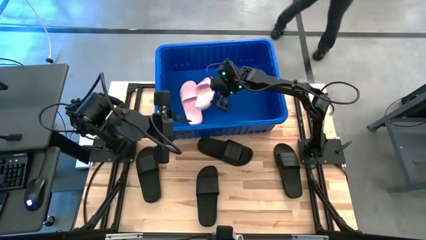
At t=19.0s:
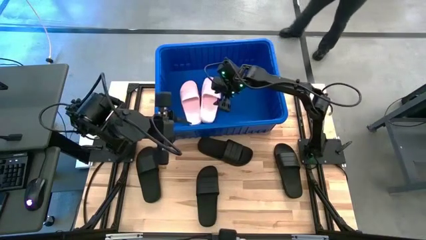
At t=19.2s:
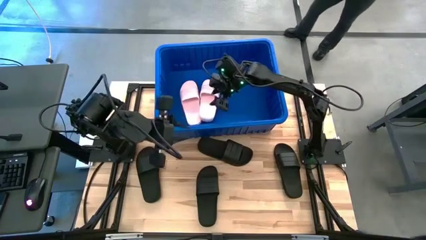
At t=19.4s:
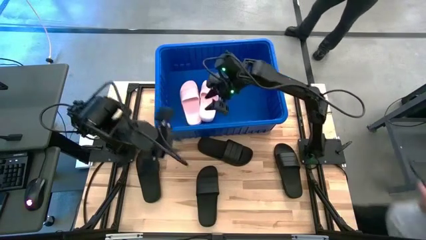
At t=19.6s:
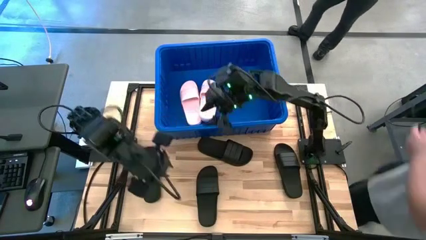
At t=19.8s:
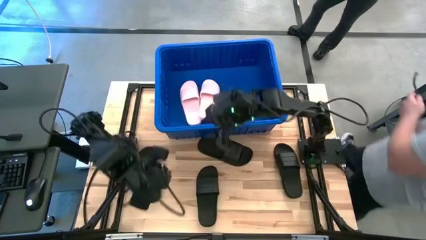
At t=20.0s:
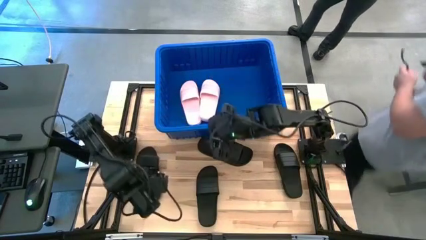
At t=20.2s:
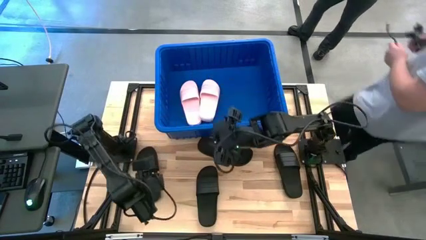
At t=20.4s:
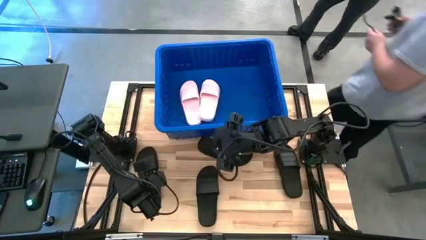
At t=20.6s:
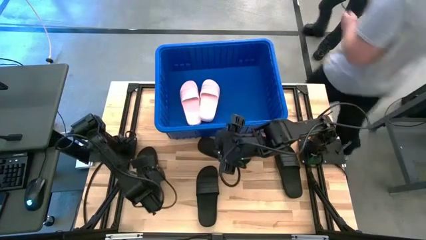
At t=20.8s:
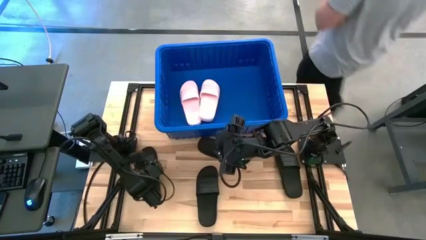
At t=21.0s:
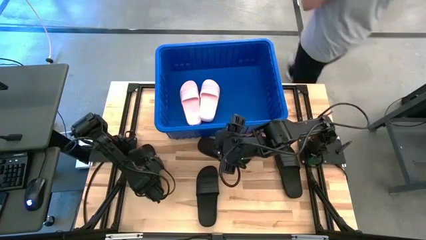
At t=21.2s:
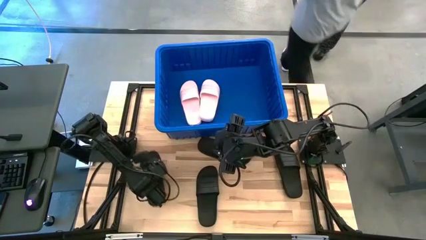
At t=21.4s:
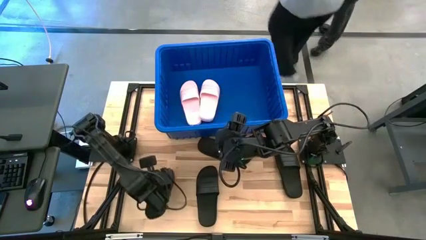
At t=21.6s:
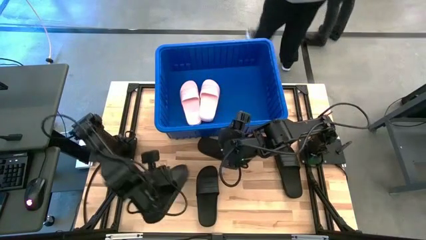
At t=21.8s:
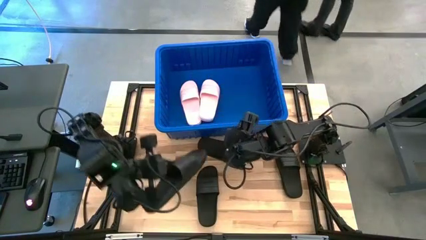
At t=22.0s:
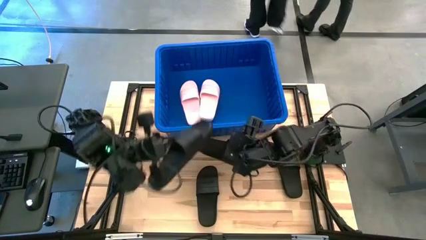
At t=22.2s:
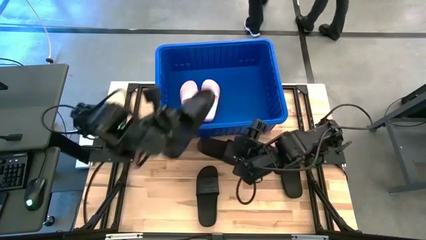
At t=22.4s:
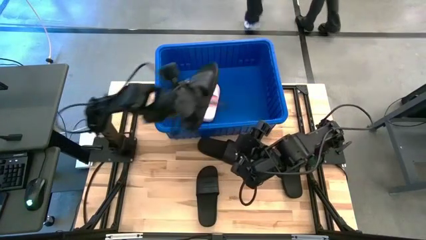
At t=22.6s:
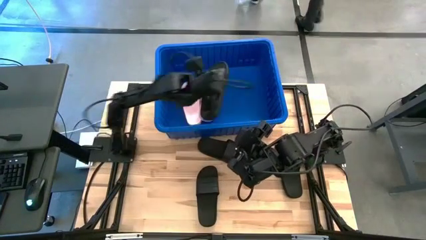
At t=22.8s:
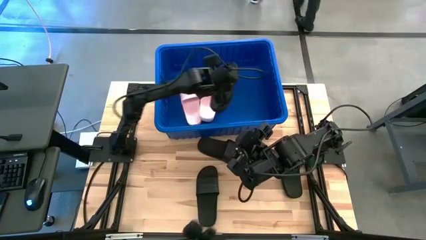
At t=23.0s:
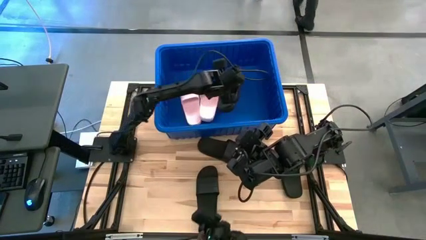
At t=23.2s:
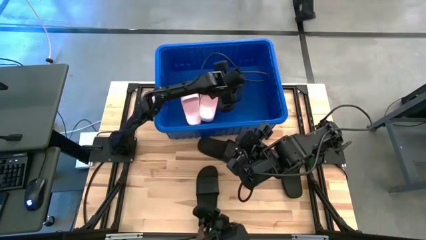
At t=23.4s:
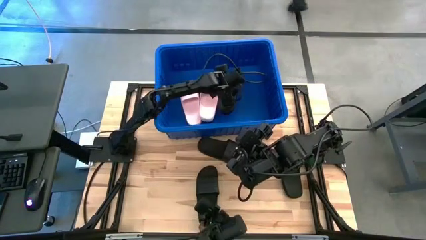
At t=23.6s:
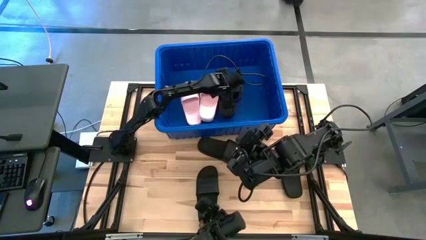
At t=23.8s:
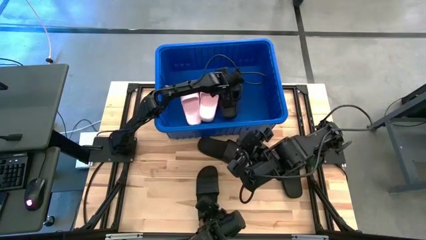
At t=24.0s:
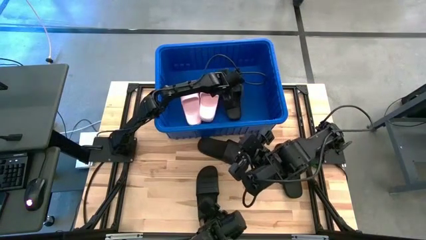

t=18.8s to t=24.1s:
Task: Pick and place slides into bin
Put the black slide into the blue container

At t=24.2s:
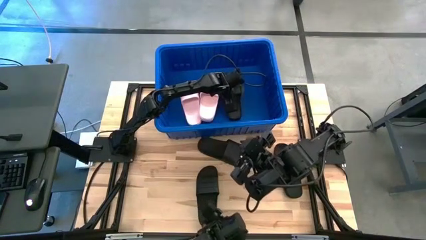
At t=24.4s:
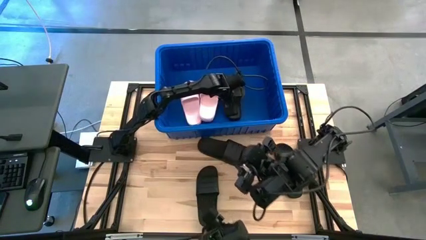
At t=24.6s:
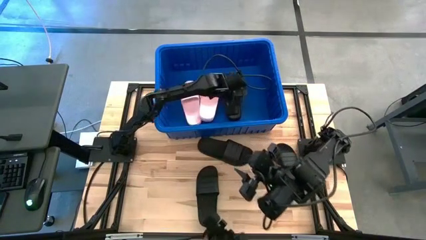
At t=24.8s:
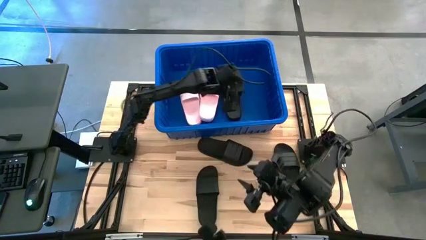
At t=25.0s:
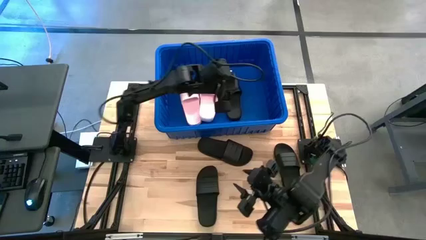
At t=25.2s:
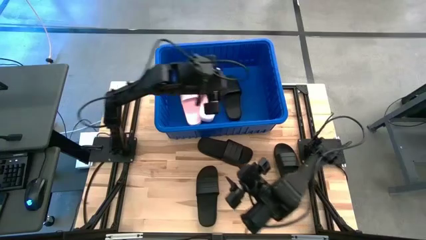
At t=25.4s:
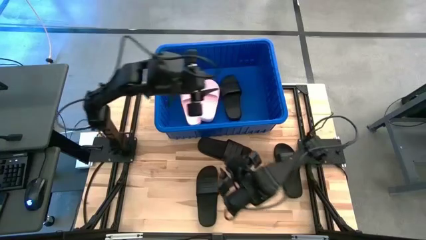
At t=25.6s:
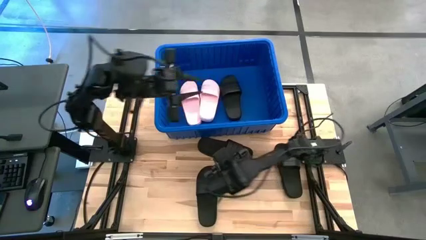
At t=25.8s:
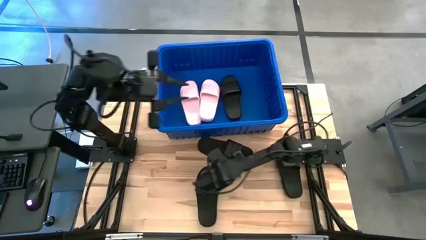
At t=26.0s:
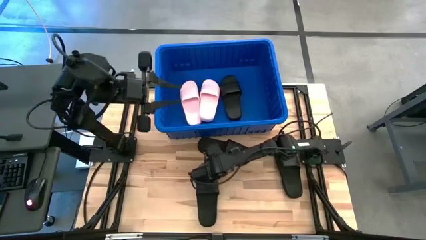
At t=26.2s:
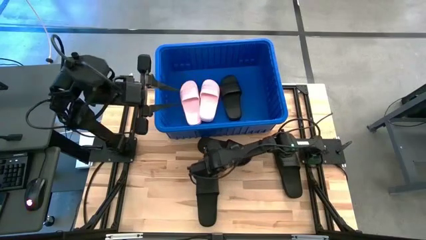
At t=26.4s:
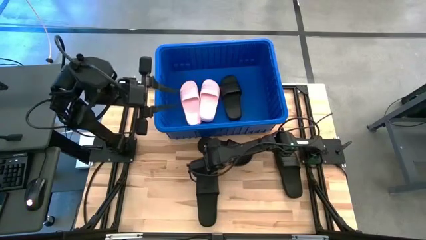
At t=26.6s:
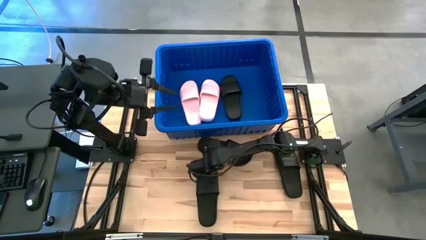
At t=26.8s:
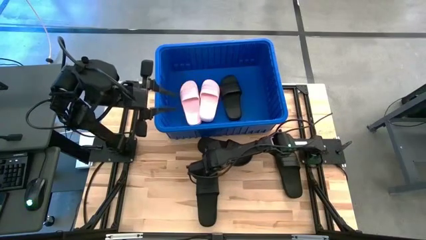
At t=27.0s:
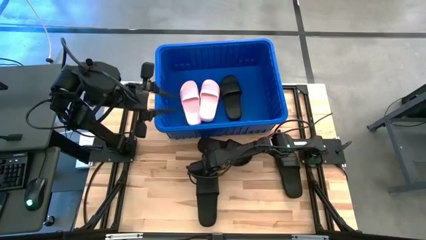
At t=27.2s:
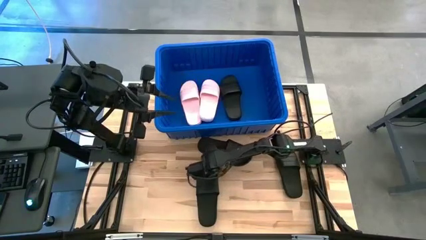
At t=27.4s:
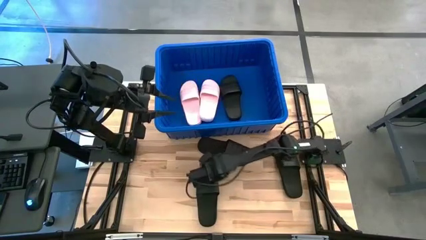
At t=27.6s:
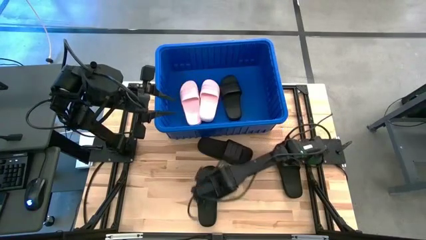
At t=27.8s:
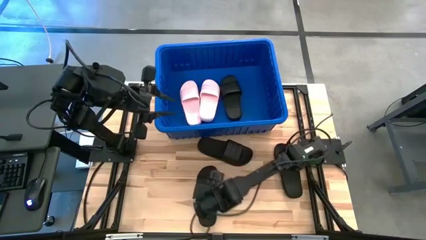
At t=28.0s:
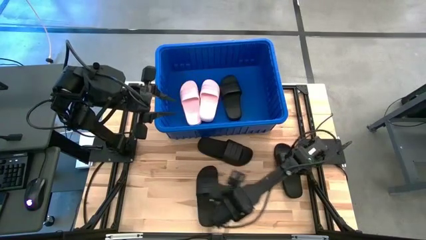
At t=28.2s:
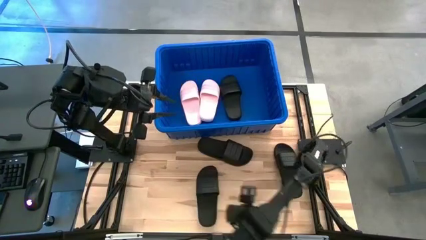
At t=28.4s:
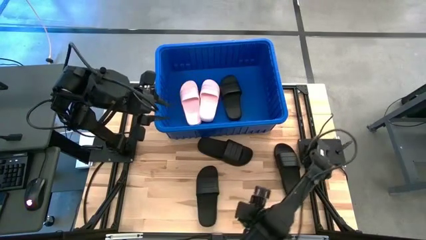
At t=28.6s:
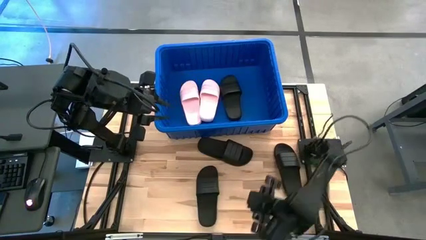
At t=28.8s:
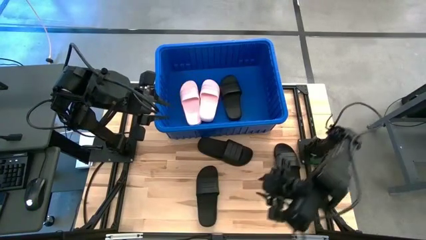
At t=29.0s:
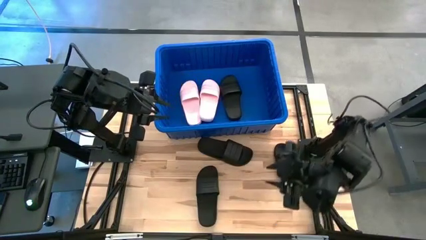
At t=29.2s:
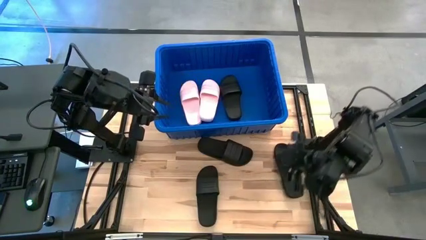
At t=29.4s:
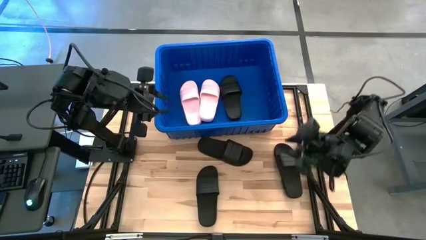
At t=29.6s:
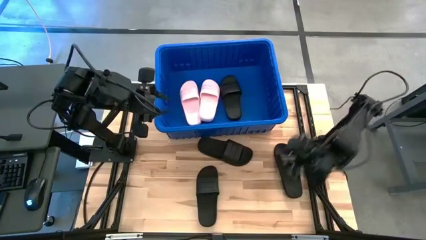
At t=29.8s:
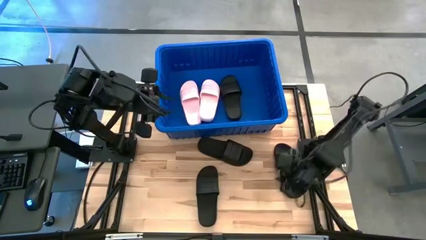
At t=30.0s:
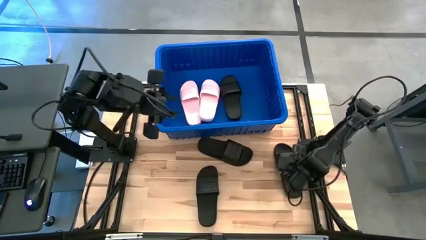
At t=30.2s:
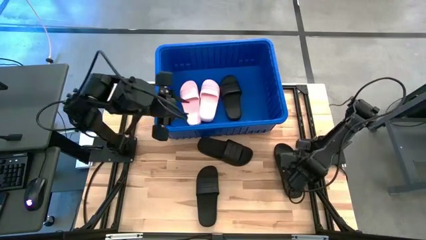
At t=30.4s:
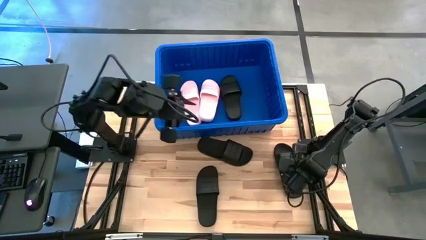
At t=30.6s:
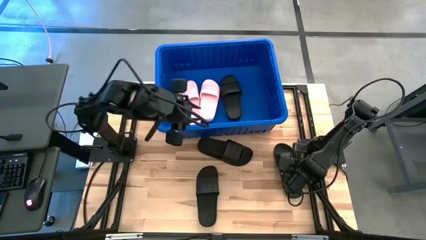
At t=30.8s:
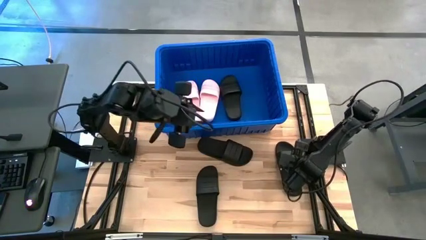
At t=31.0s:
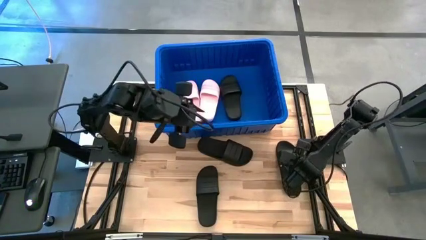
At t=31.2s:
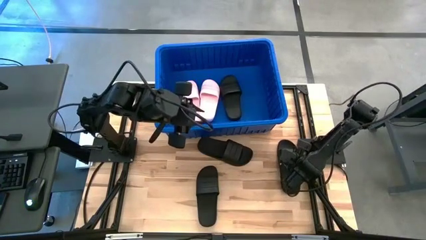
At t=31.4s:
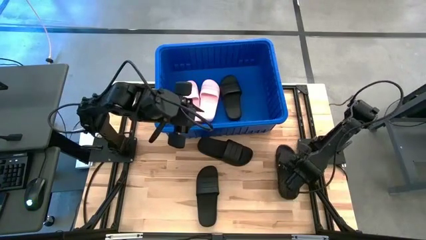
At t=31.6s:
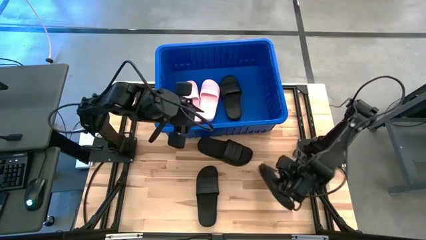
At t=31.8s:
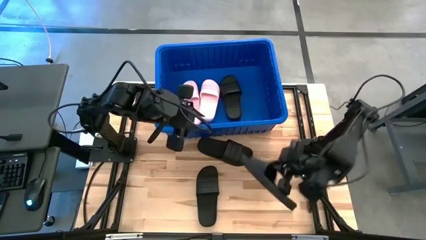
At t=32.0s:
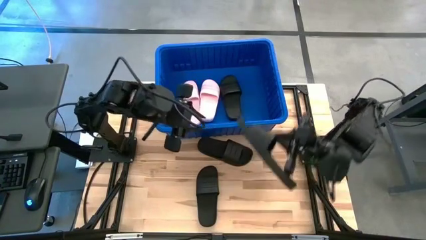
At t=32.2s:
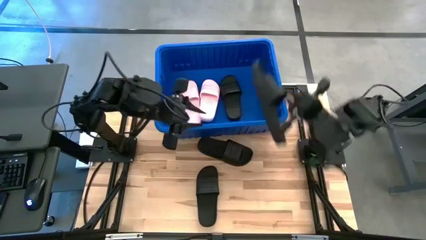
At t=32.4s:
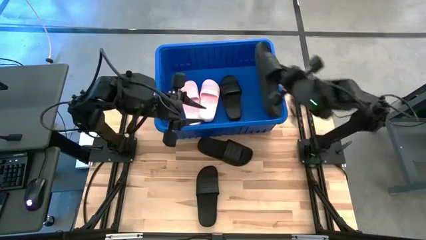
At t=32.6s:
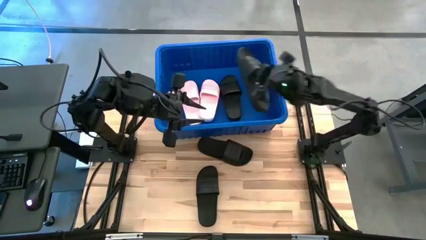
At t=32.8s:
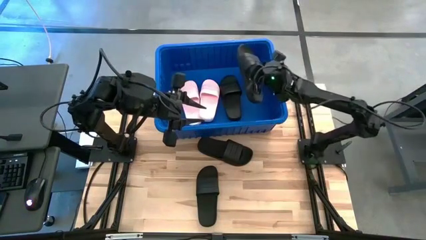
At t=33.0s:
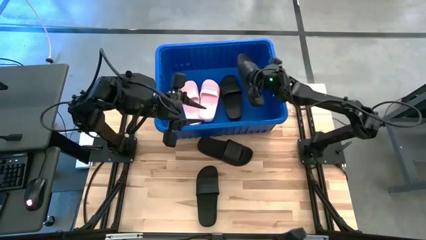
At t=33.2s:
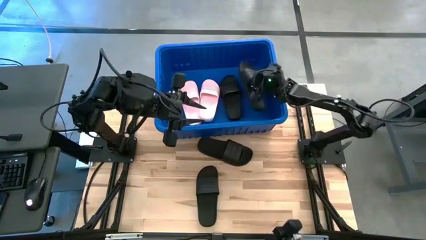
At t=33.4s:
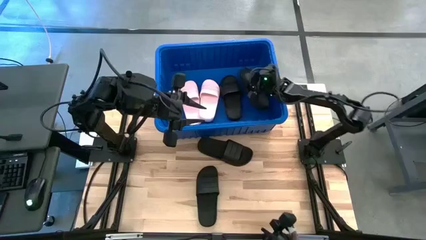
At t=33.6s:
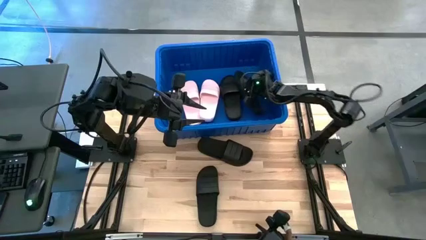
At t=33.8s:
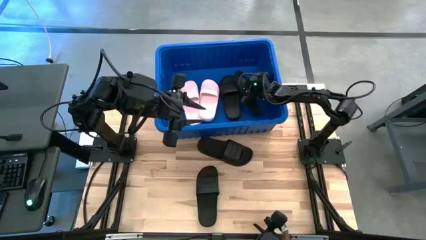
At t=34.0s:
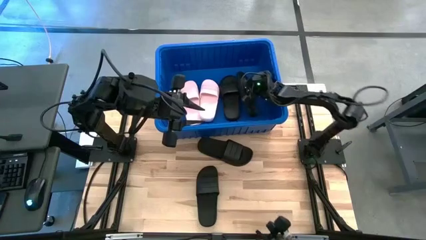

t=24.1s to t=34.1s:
Put the black slide into the blue container

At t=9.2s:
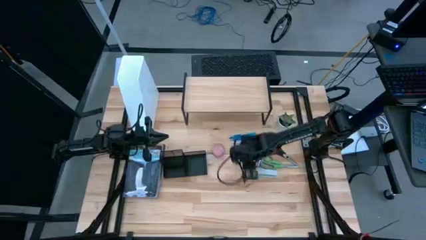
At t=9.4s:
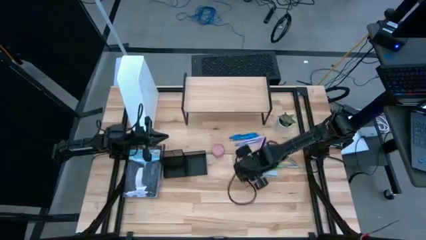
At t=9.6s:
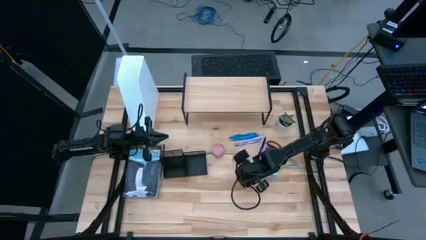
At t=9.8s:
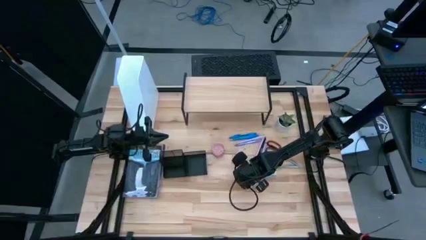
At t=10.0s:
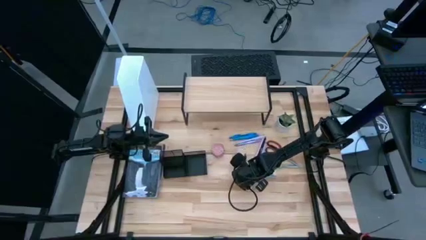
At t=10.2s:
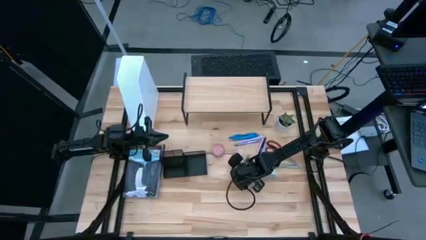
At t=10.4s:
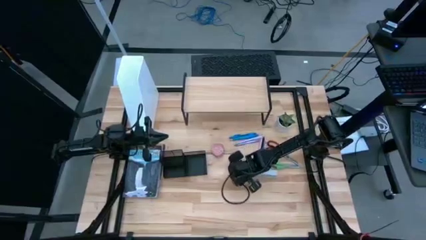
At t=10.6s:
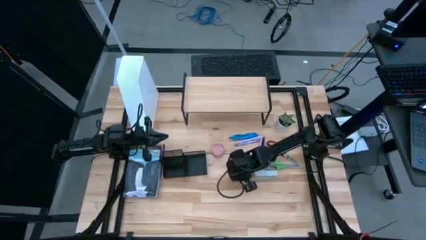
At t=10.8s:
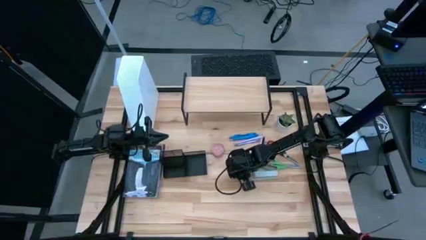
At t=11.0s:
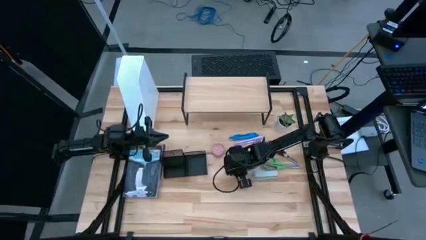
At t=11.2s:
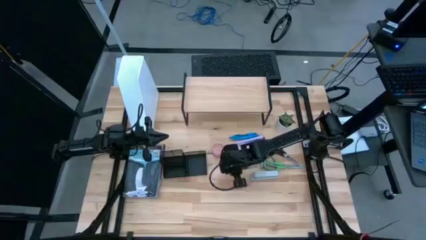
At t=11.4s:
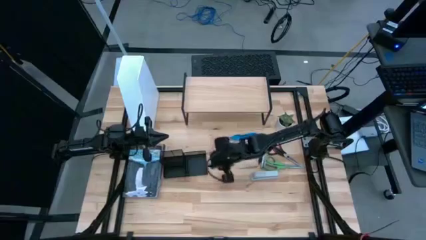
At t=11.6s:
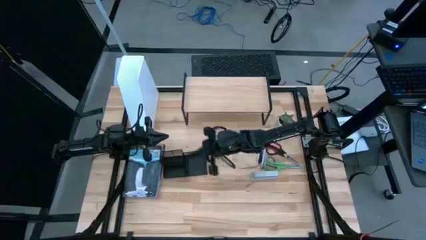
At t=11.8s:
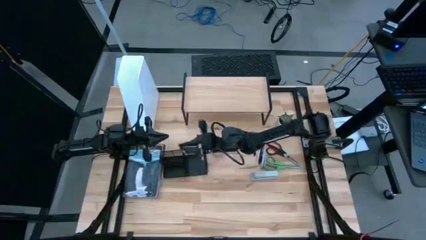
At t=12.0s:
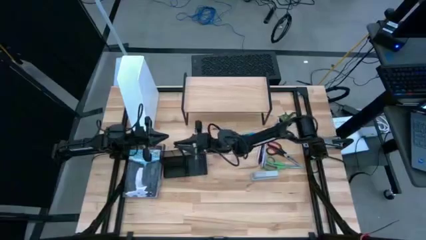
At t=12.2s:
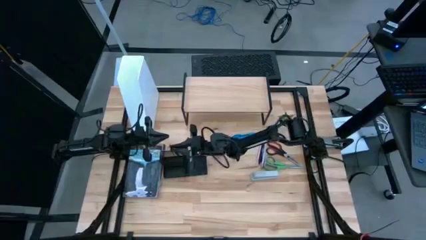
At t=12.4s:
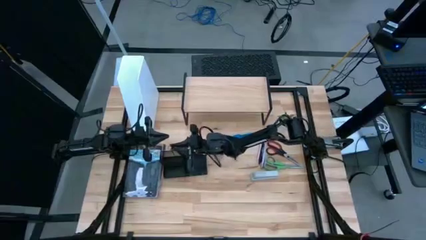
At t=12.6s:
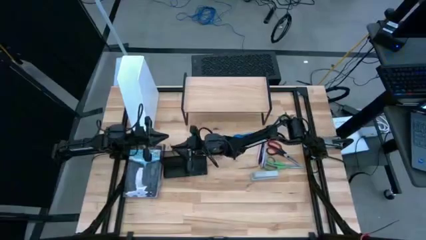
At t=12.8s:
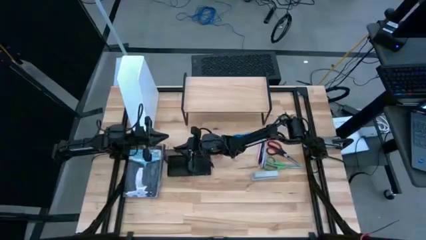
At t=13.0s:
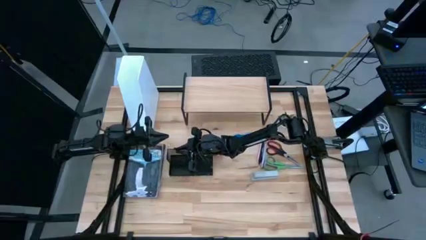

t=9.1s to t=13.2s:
Task: Stock shelves
Put the black pen into the desk organizer
